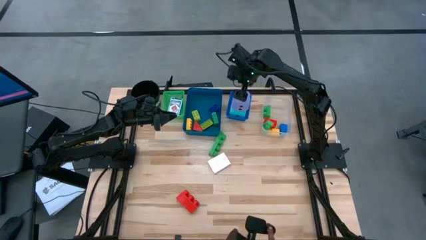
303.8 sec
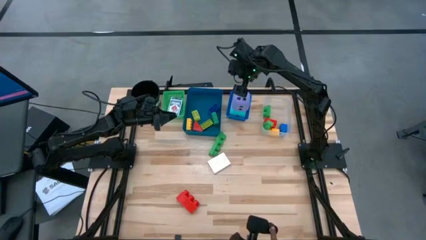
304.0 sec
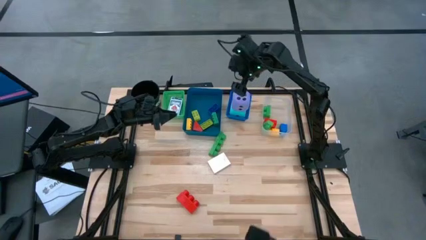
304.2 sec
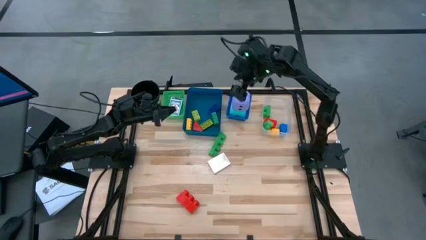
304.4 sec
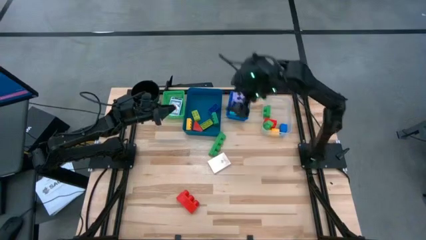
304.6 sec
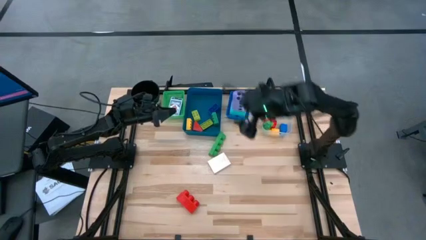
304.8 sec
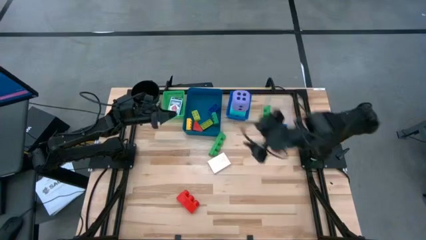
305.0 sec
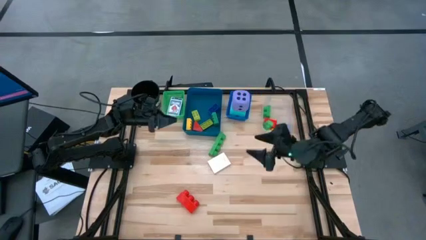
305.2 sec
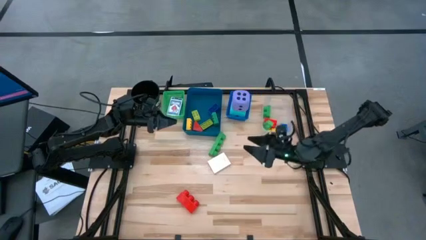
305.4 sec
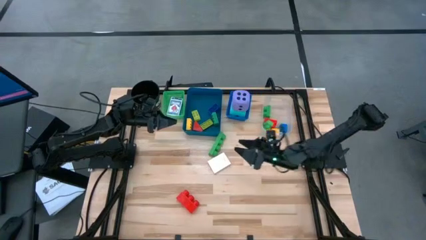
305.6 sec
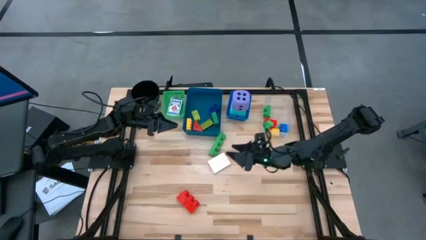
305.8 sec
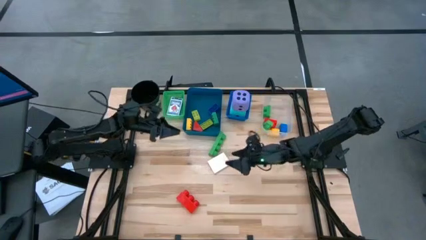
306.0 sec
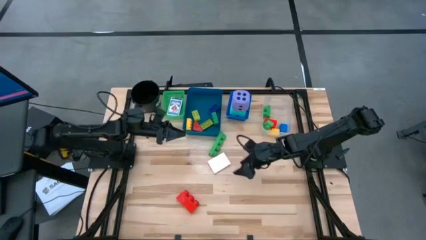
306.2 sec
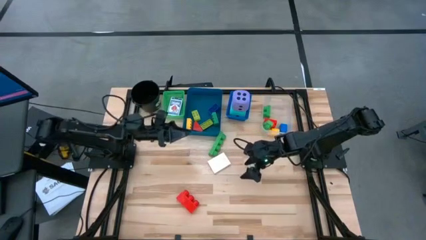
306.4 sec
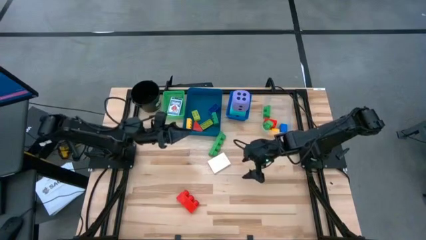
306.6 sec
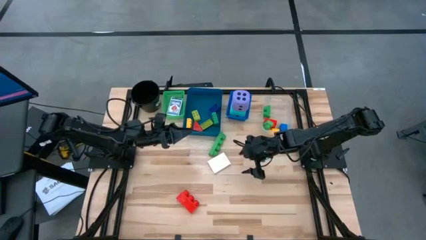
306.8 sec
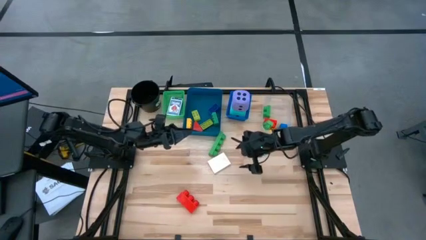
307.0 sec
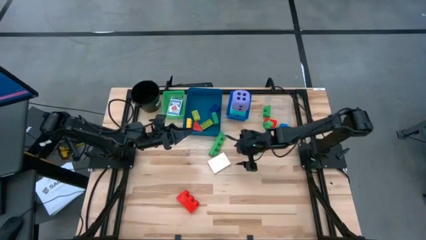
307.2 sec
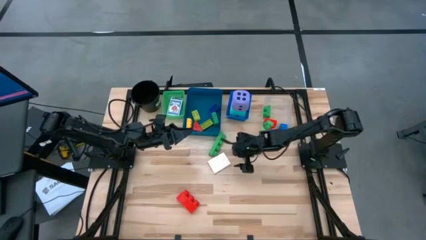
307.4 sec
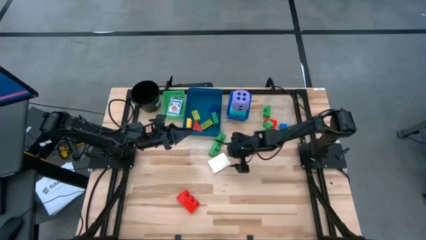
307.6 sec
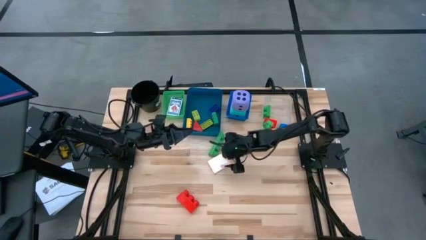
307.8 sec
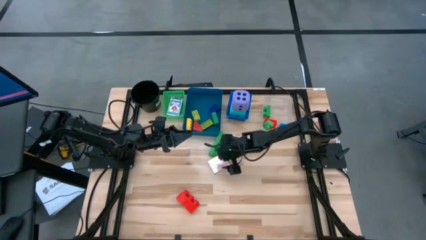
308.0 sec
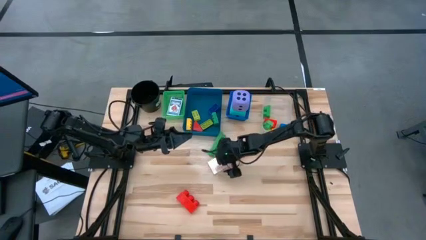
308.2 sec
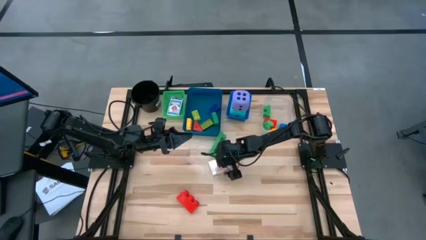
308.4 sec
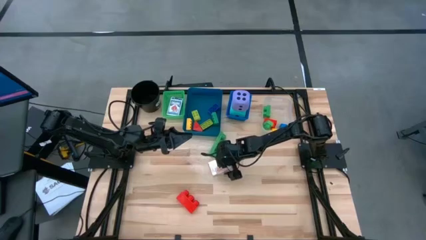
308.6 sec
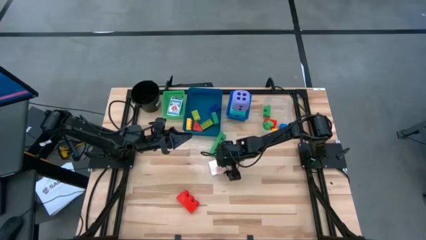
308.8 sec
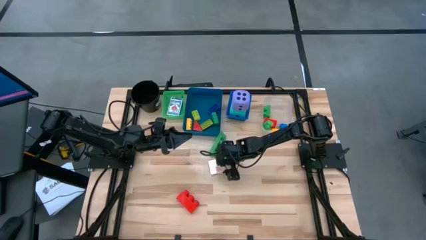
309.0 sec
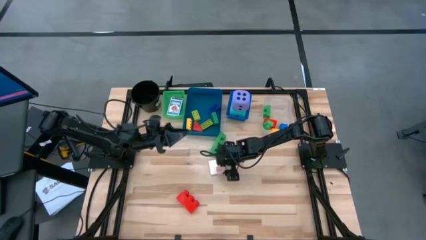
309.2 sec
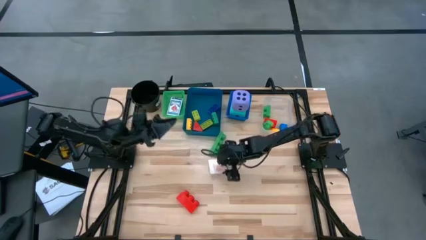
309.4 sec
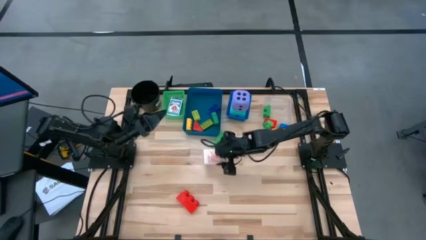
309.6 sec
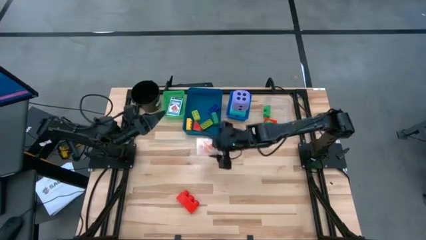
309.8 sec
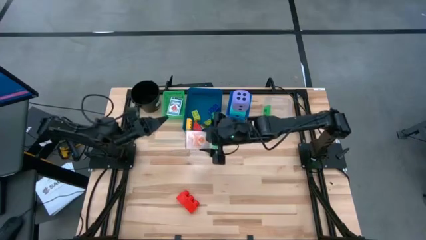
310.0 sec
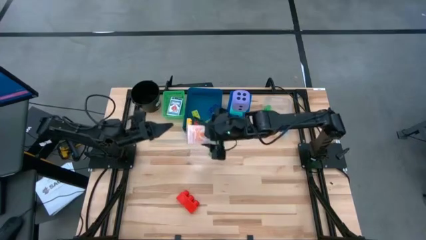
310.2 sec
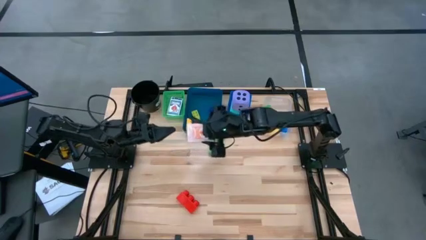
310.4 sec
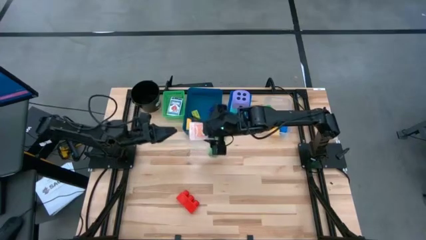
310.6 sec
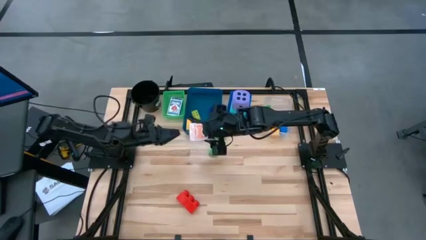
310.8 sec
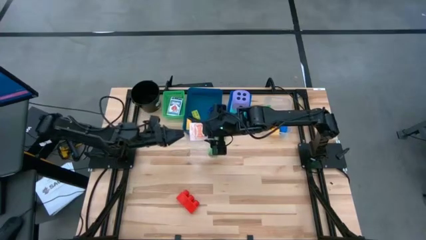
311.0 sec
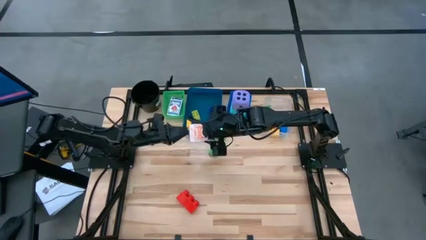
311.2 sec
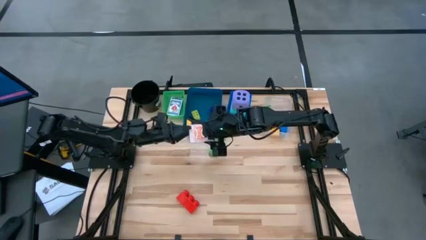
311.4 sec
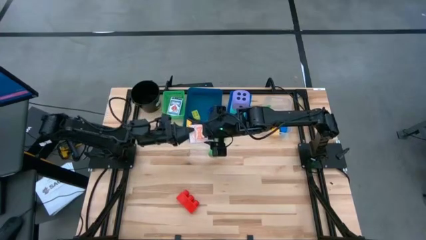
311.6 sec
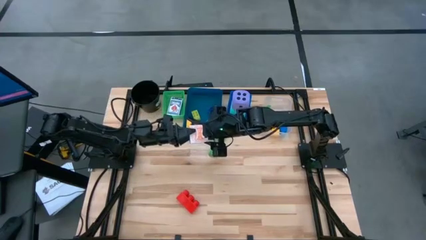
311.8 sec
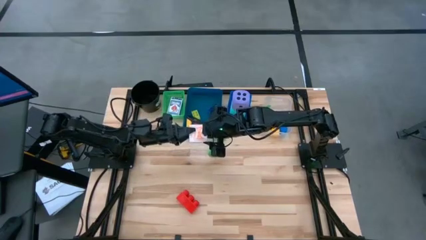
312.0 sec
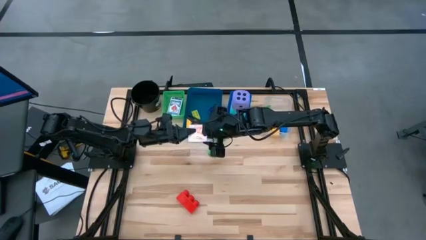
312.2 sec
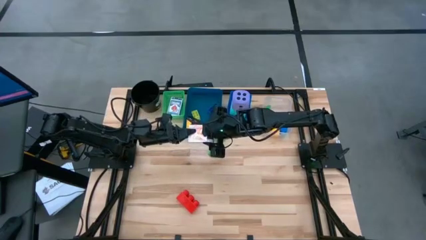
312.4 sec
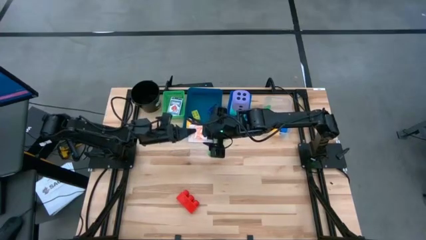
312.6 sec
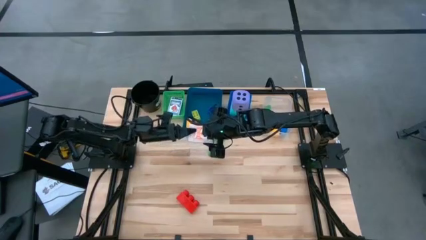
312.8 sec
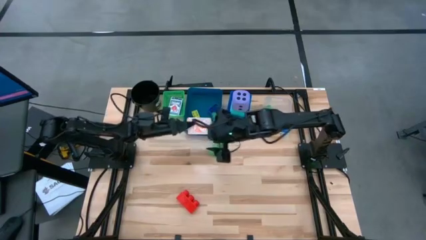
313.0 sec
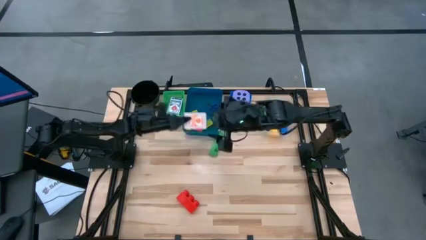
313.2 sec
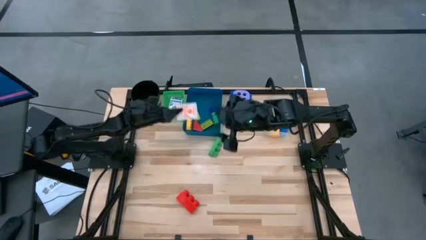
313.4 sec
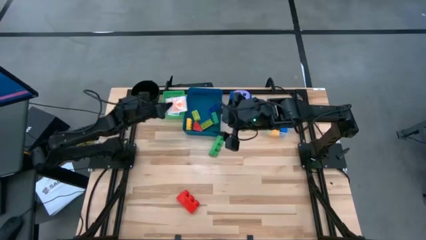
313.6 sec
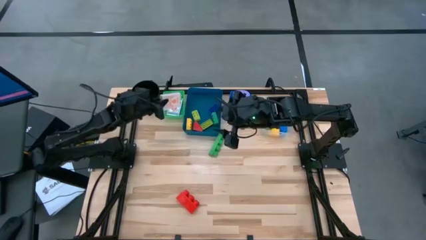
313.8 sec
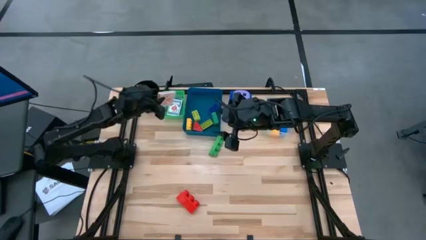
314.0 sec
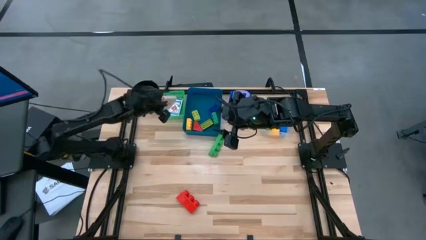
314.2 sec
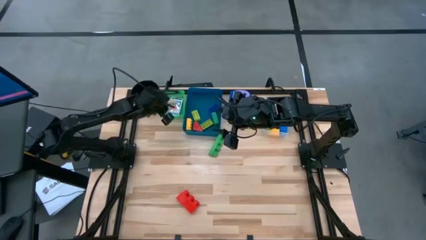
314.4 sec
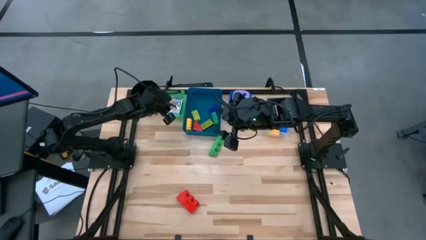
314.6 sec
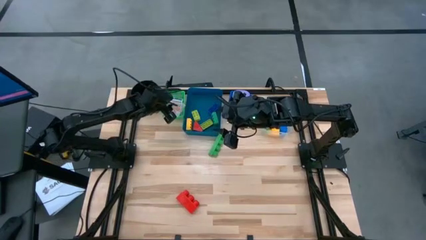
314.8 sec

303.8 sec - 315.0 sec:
Task: Pick & Place Toys
Put the orange game card into the green bin

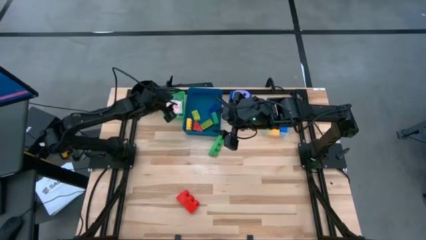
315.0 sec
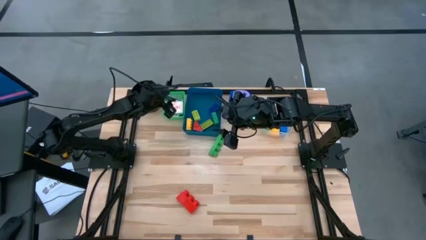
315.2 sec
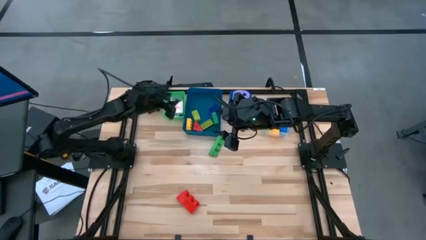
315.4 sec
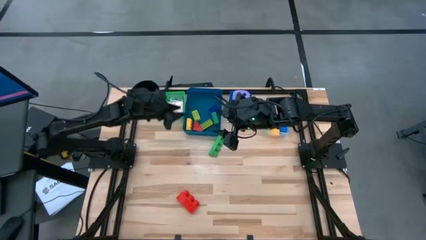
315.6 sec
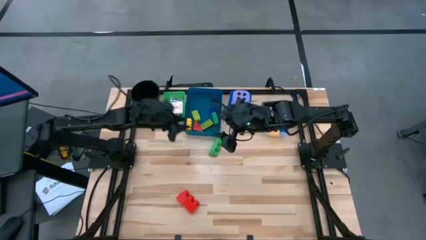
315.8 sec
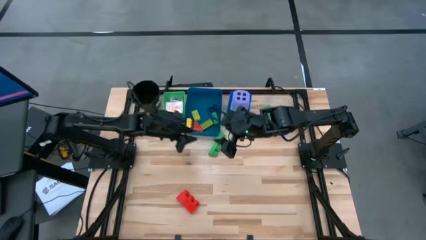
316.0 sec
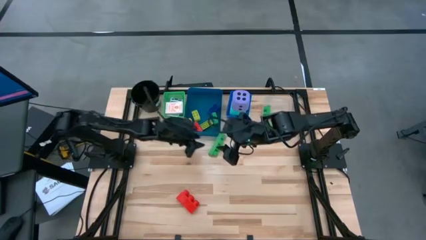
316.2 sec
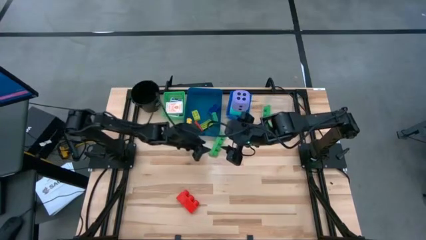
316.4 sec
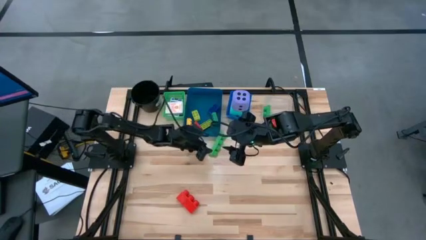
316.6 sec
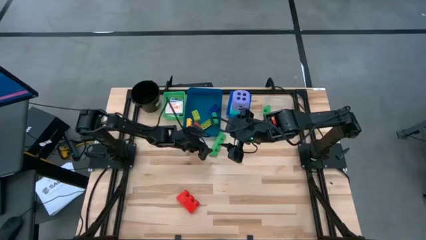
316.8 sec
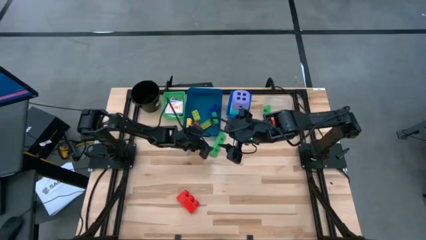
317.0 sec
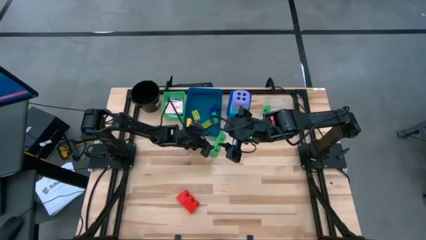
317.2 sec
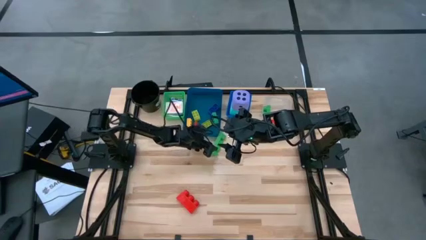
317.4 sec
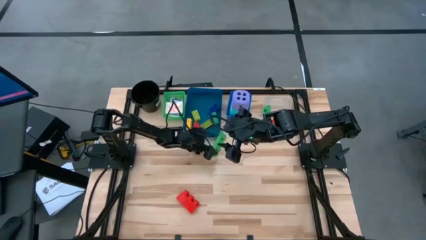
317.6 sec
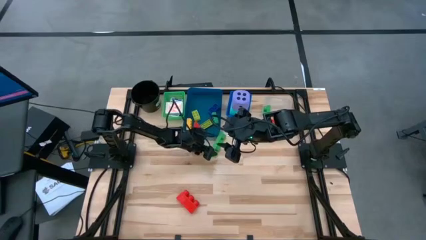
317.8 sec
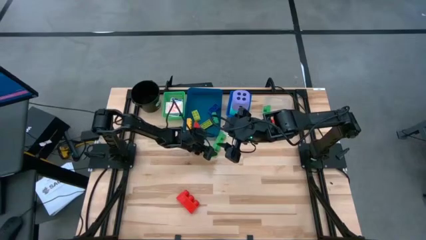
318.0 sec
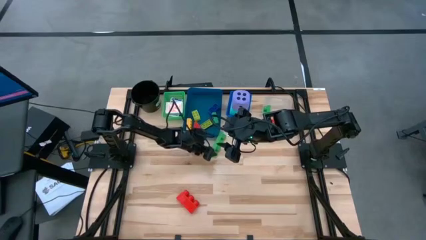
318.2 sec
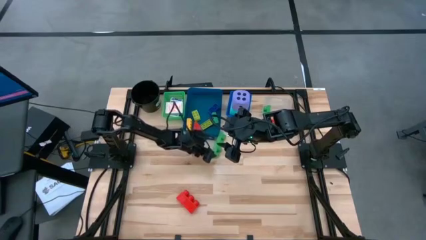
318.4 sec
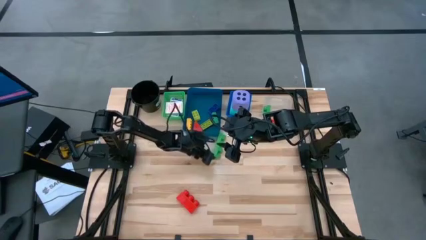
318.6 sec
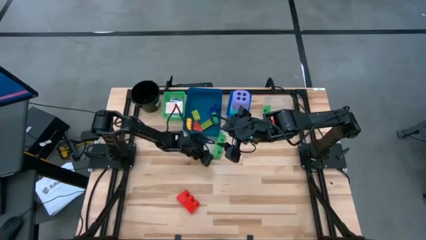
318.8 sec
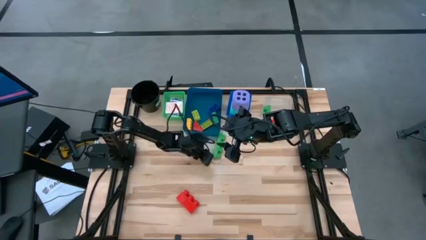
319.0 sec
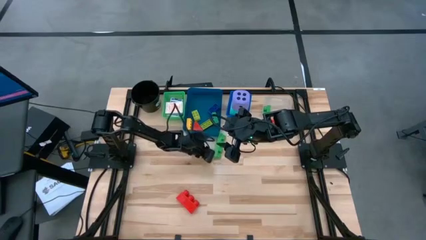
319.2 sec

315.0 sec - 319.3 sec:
Put the large green game piece into the transparent bin
